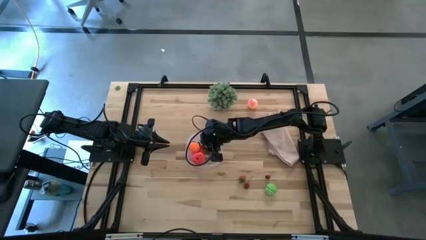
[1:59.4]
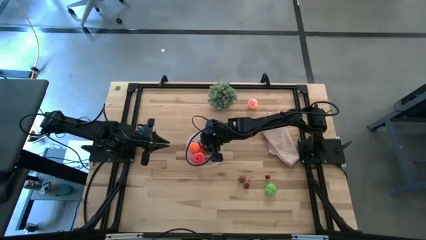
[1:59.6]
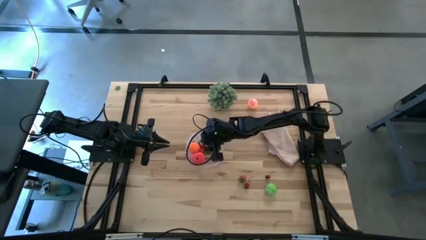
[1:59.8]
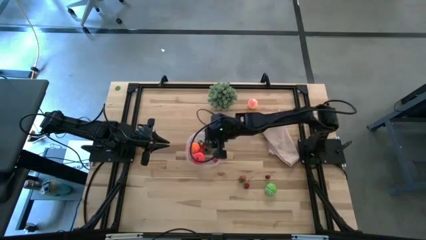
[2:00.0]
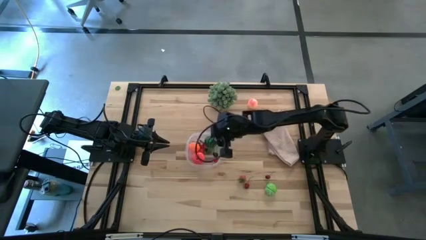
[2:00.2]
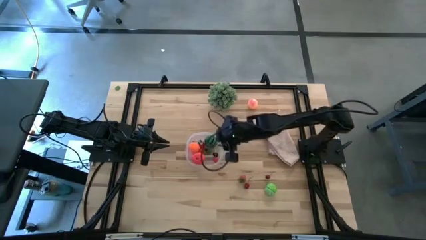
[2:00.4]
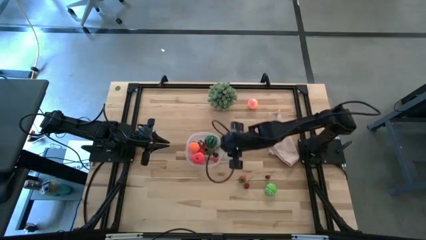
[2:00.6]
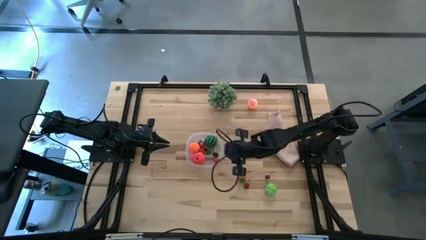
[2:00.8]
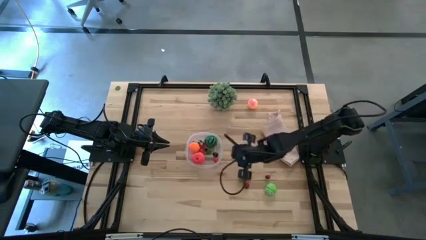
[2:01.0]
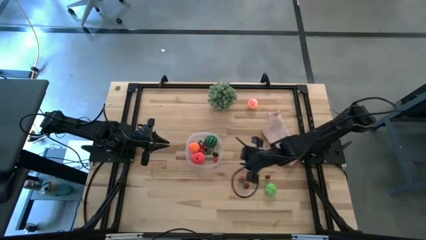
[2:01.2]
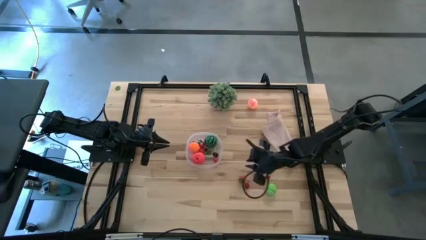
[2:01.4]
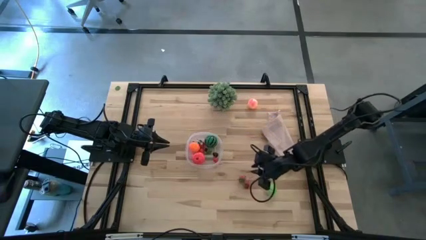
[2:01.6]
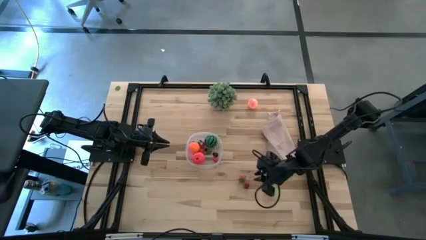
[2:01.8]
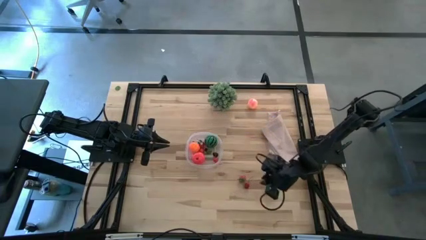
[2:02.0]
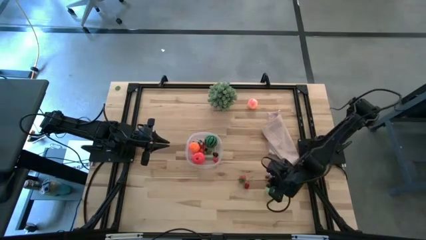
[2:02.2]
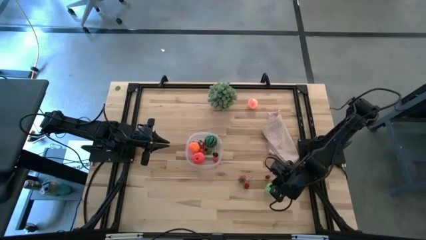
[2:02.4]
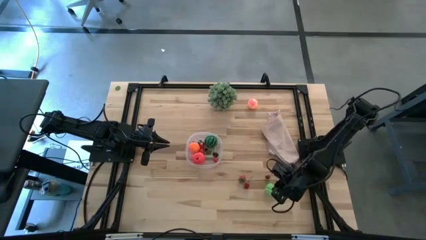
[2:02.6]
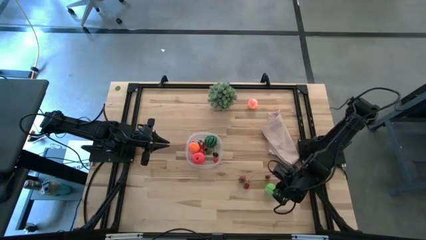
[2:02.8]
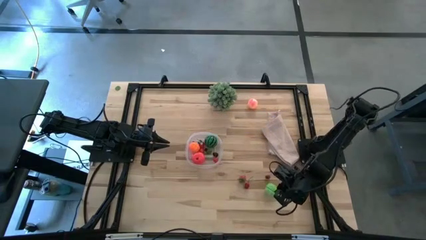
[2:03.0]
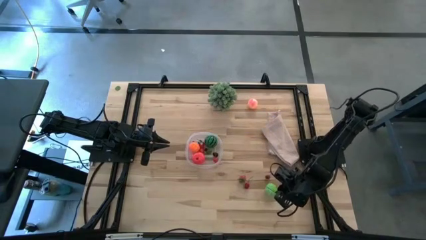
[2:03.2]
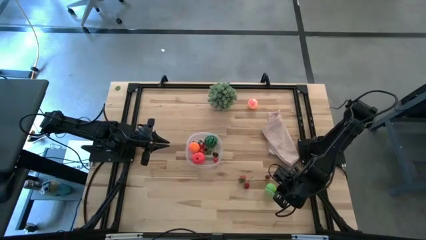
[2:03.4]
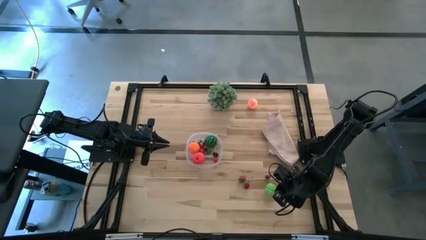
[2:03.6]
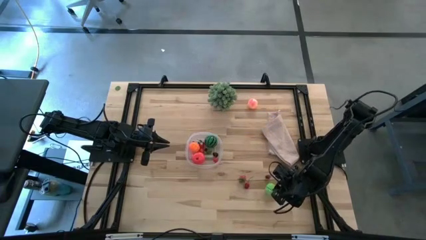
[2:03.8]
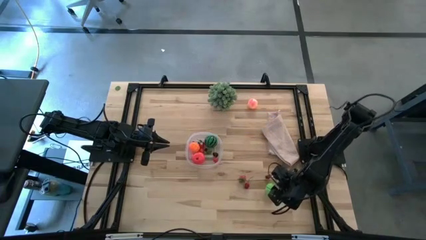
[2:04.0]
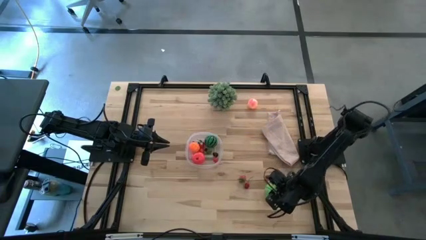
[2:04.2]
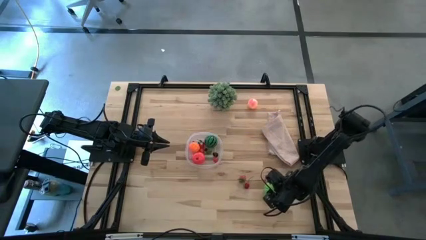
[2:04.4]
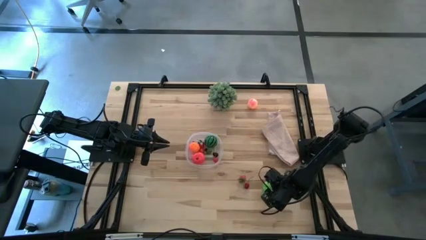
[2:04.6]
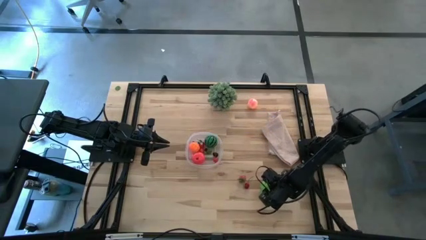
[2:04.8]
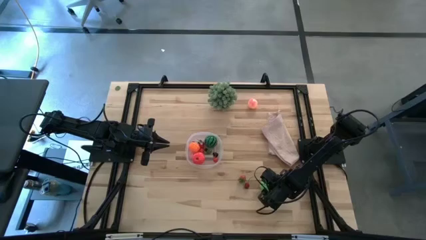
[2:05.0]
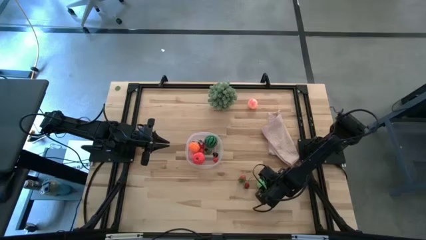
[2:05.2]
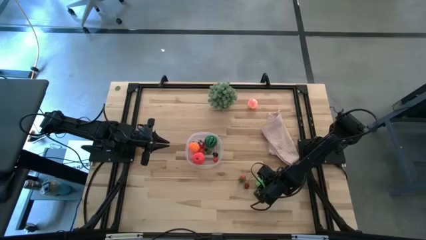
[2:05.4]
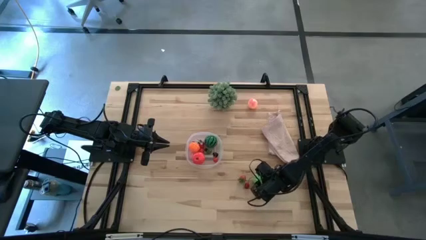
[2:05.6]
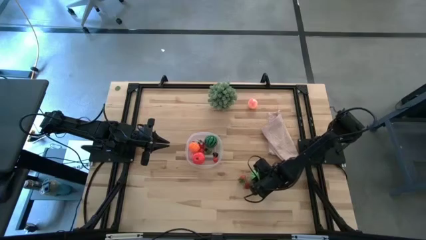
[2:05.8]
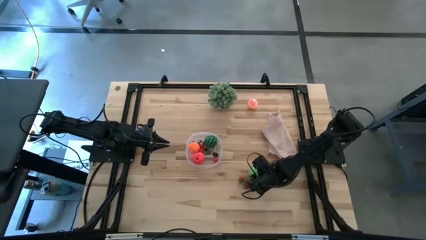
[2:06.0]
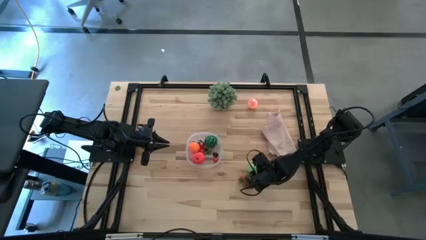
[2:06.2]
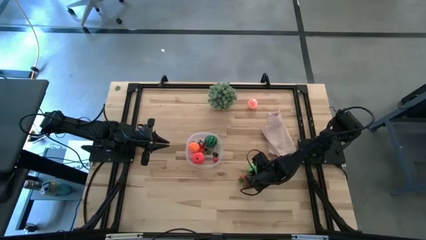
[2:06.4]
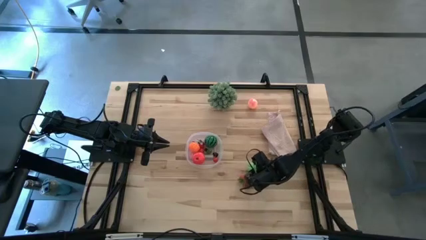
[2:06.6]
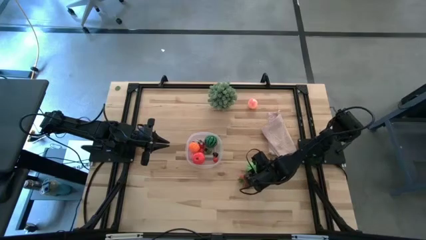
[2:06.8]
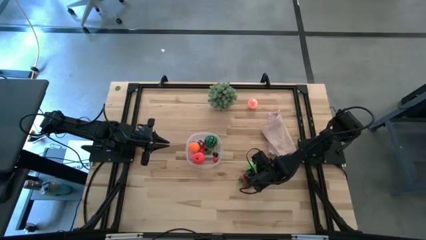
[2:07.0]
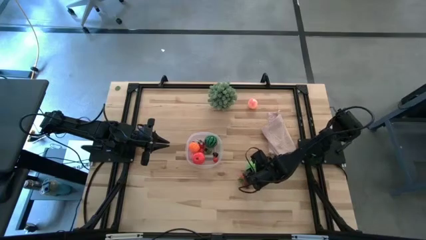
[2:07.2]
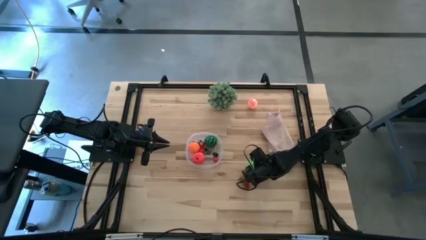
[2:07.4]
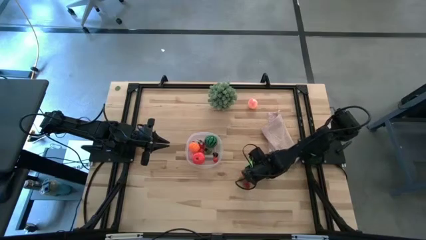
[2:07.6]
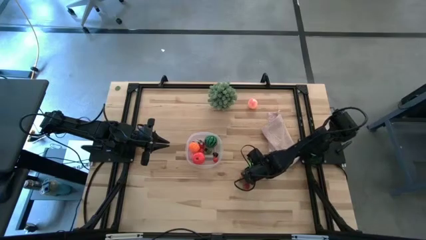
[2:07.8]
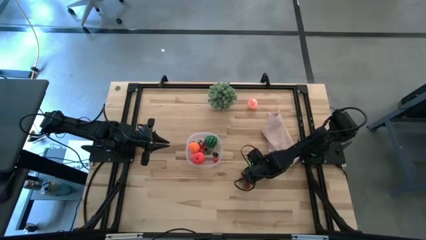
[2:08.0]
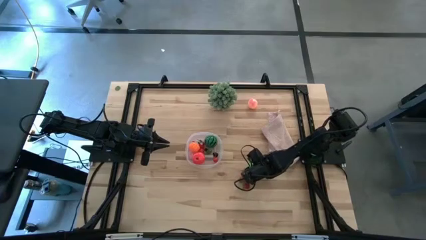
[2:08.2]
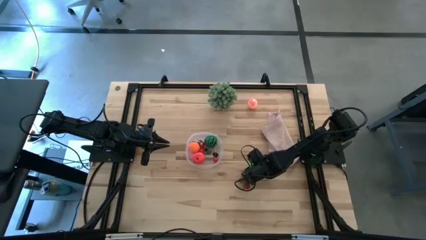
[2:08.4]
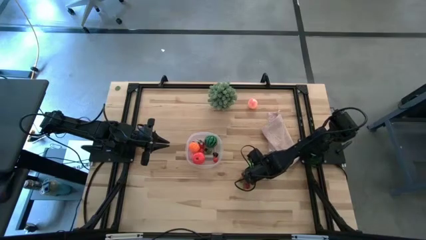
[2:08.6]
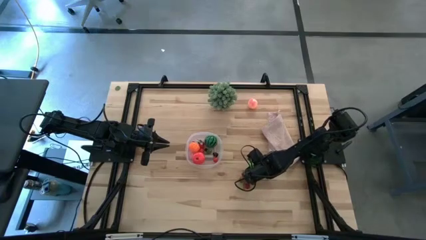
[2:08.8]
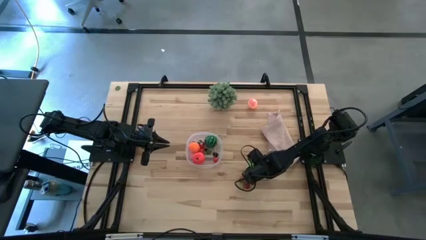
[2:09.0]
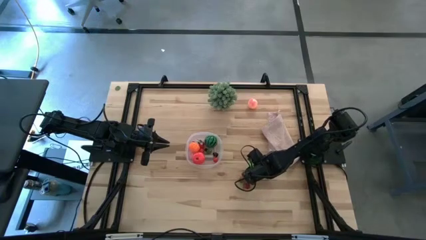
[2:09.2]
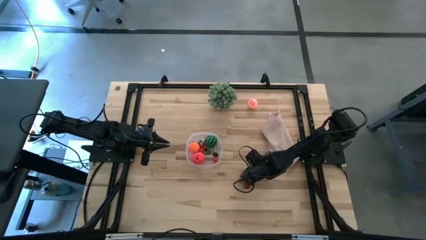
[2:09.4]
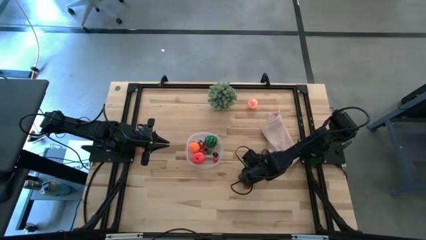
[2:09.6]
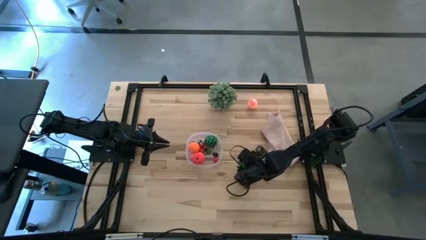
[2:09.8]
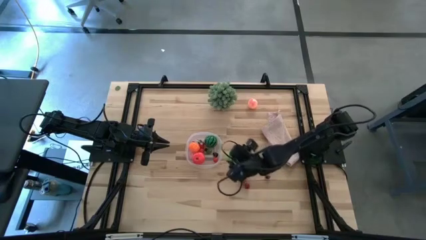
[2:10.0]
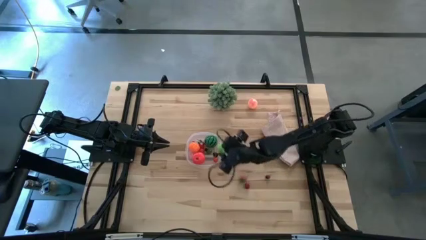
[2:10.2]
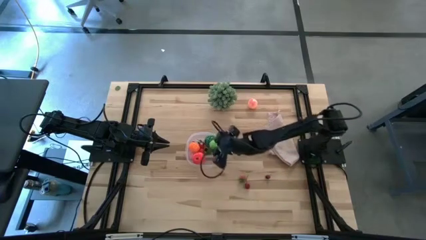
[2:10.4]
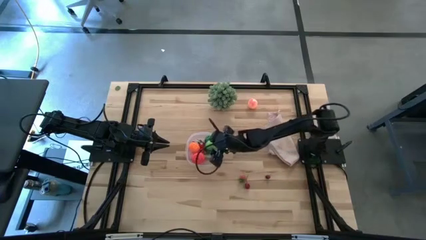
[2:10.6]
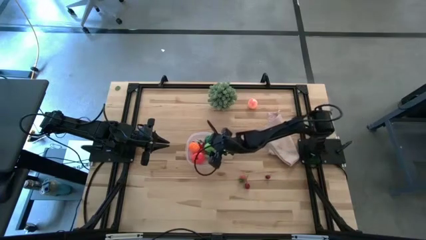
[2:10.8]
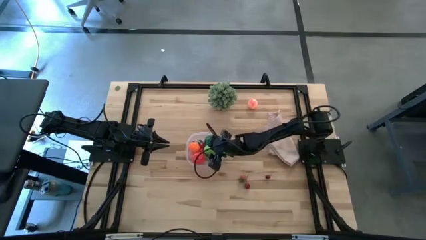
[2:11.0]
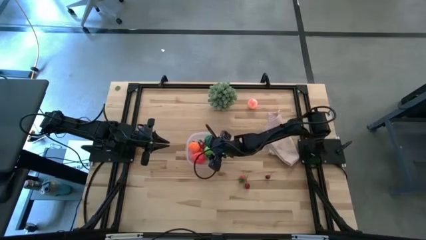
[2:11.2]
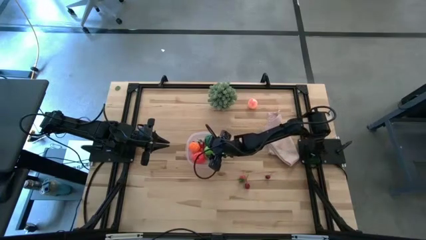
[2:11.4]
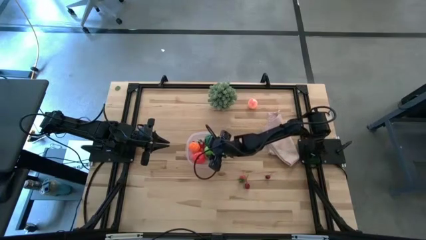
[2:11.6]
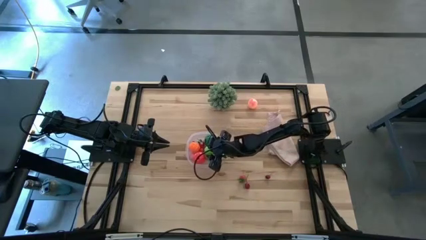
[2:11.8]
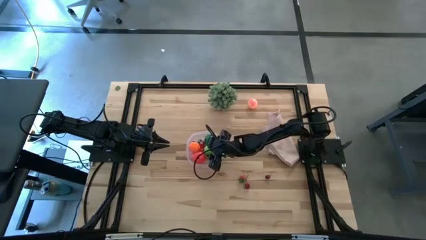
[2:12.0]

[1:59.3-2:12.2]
Task: Pick and placing Produce into tupperware
Put the green cabbage into the transparent bin

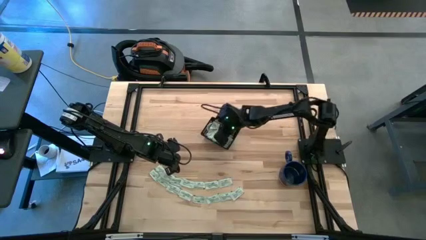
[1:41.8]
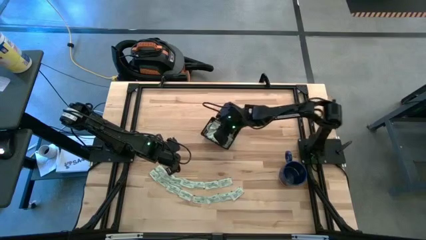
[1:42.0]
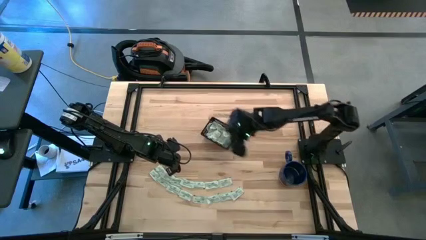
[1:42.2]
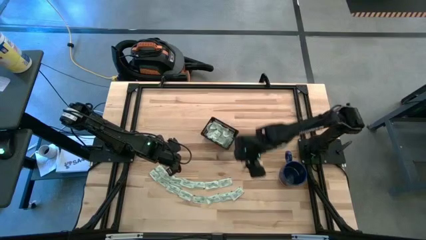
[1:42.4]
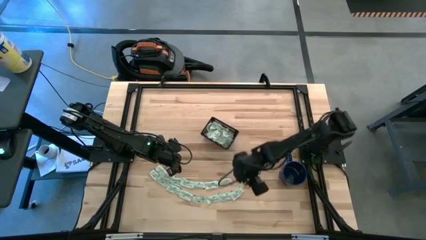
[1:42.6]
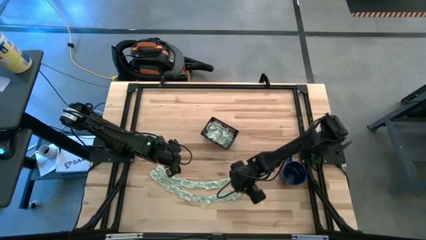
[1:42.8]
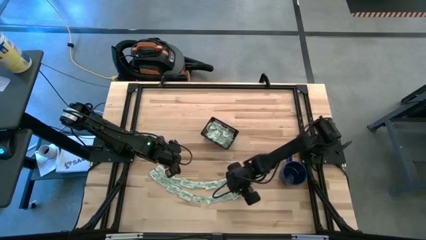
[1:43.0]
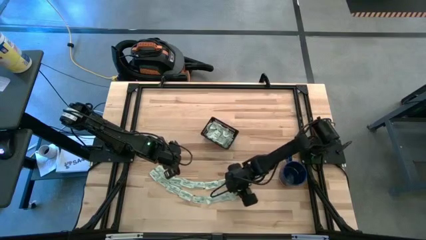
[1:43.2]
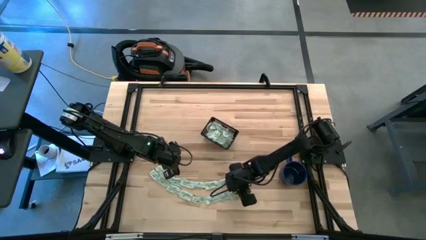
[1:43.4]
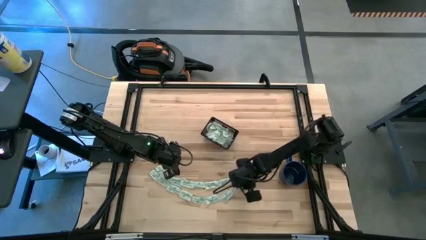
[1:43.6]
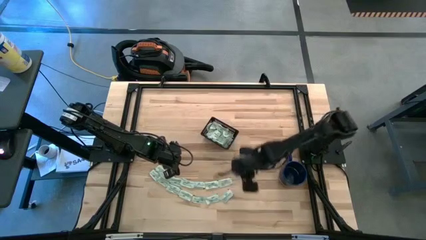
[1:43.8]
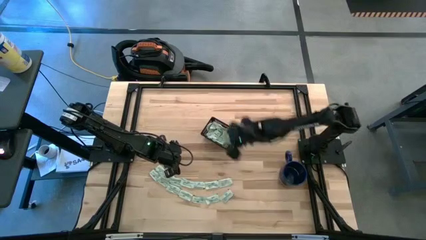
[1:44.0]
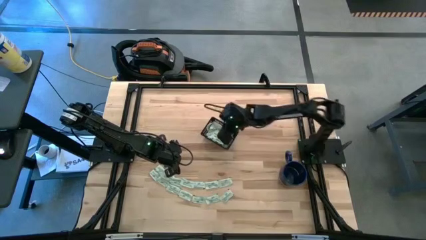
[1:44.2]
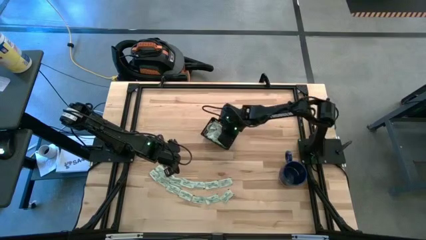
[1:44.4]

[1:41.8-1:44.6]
Task: Pick and place Stevia / Truvia into bins
Put the stevia packet into the black bin

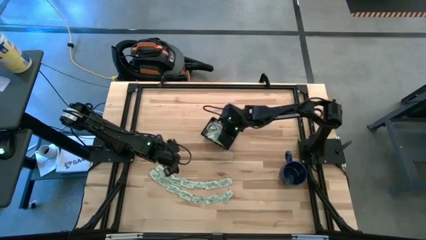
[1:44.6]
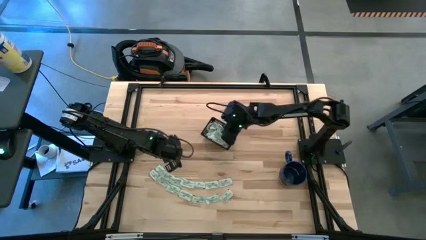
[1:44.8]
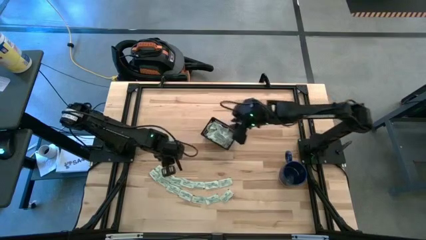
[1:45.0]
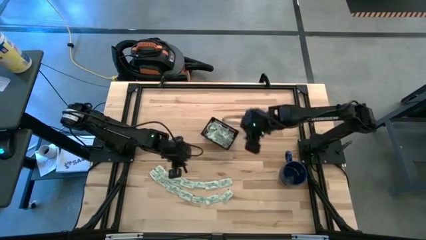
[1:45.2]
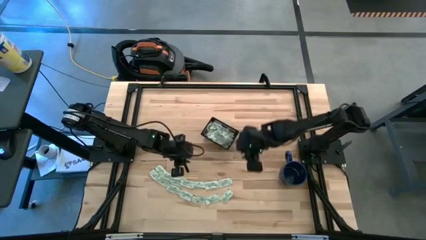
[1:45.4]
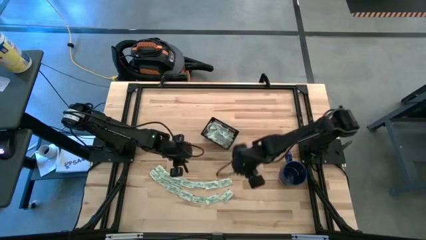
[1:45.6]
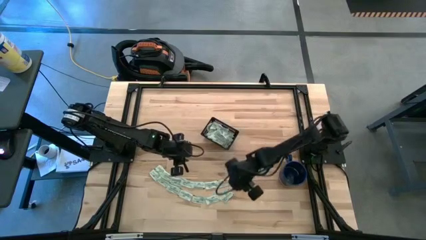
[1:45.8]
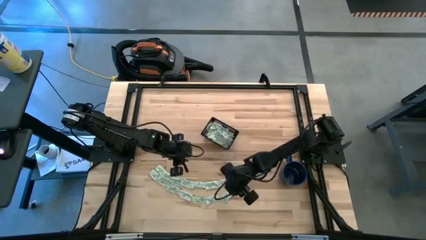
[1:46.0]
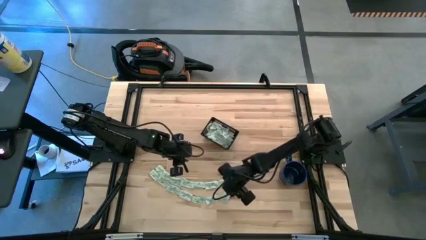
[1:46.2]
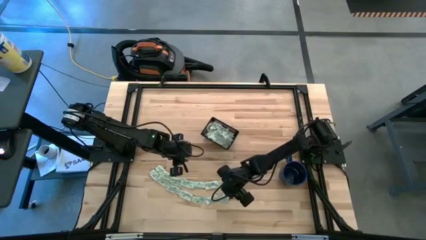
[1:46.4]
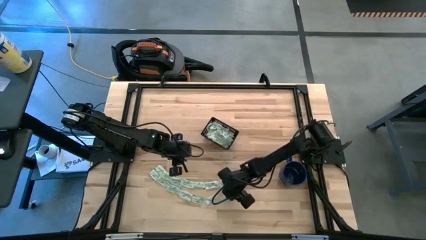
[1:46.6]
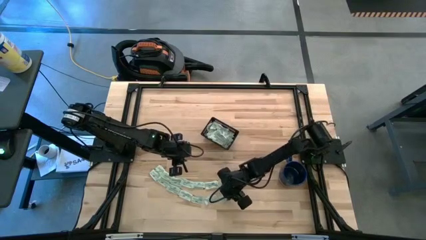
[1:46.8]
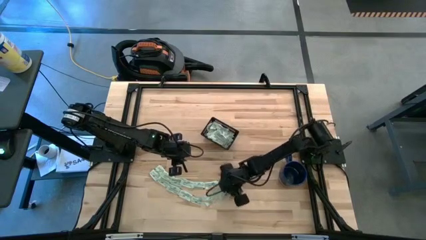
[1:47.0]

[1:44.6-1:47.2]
Put the stevia packet into the black bin
